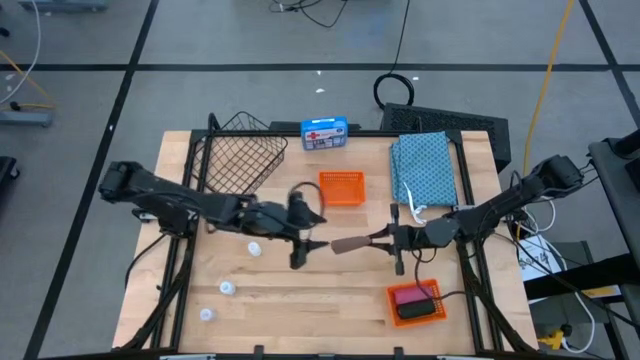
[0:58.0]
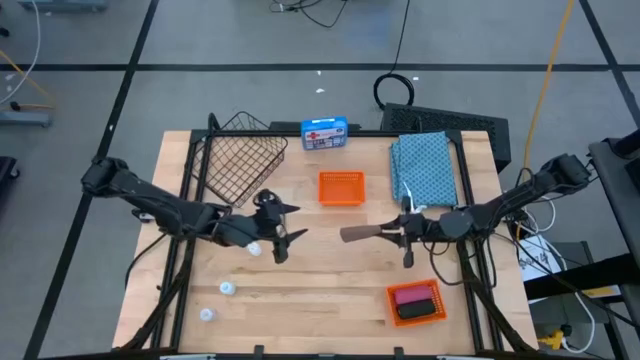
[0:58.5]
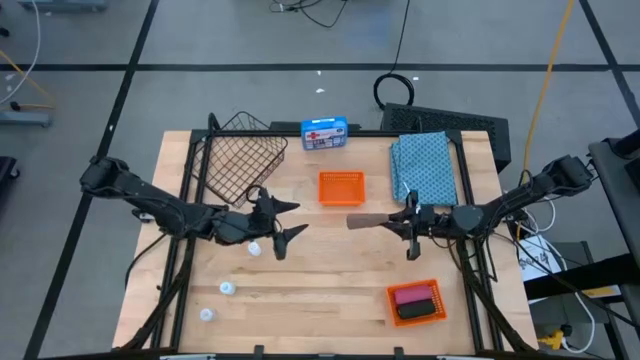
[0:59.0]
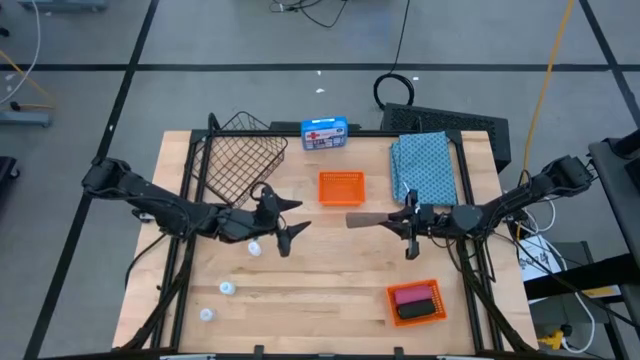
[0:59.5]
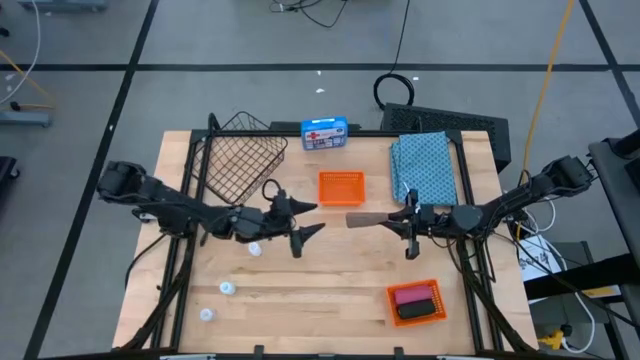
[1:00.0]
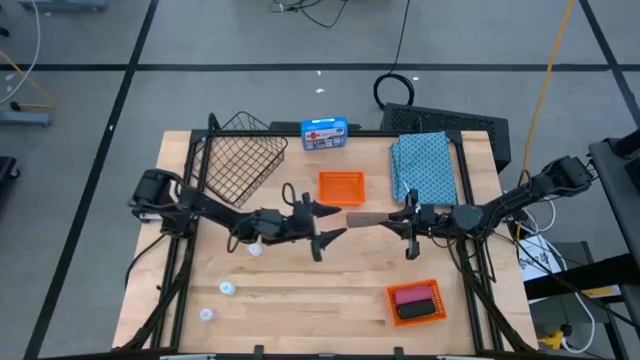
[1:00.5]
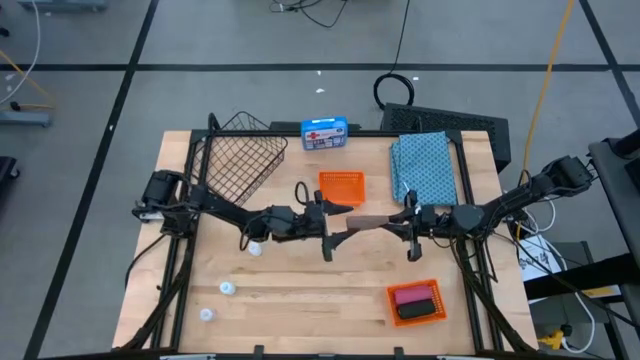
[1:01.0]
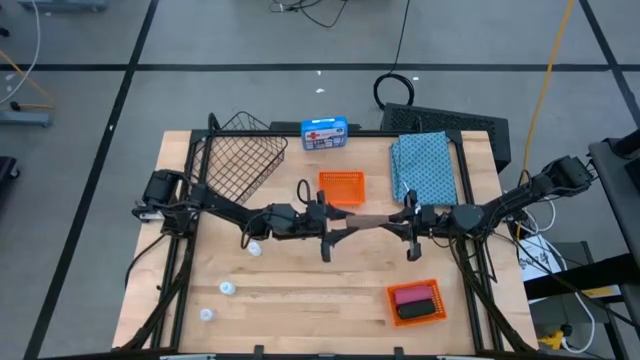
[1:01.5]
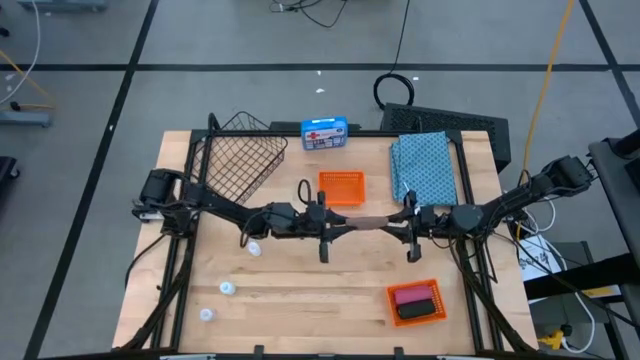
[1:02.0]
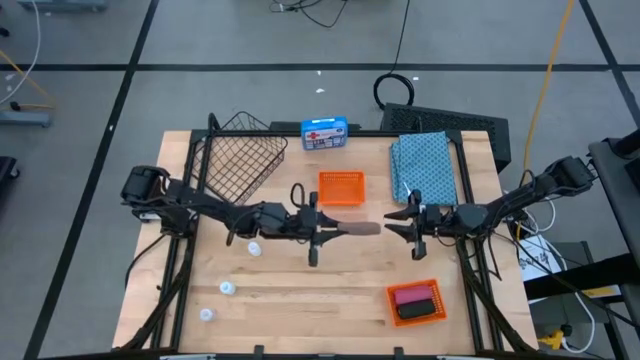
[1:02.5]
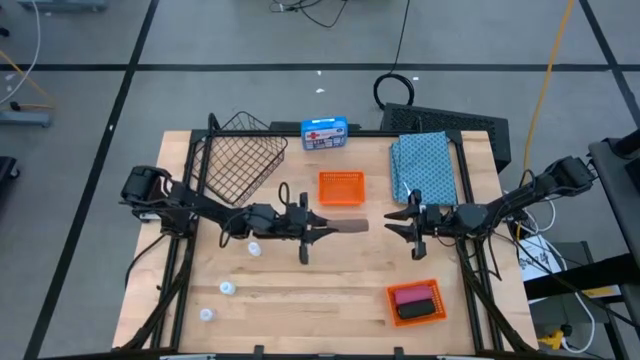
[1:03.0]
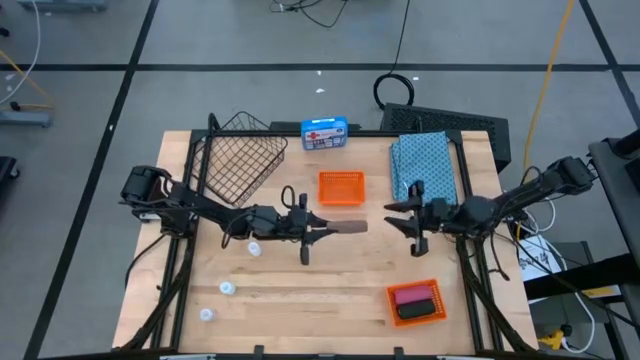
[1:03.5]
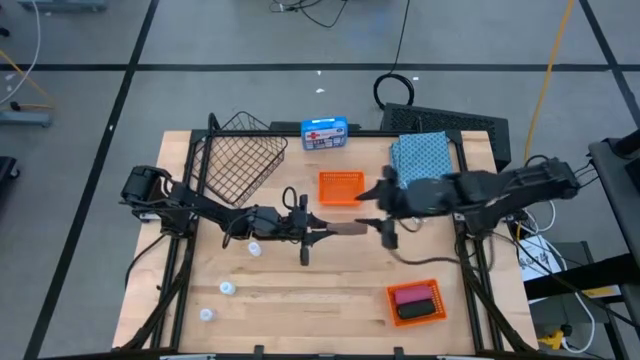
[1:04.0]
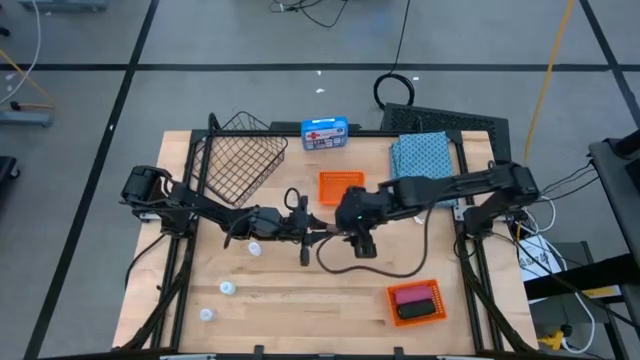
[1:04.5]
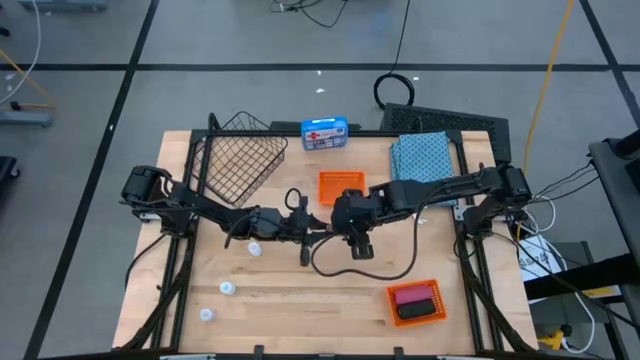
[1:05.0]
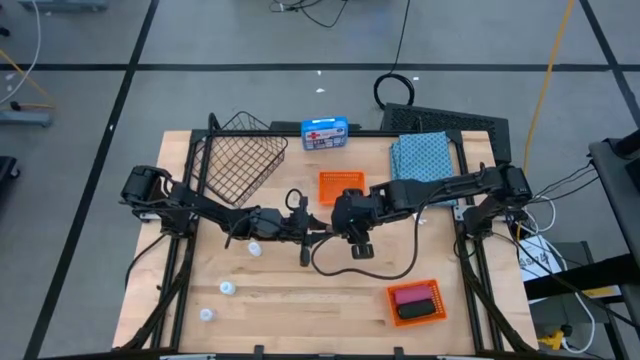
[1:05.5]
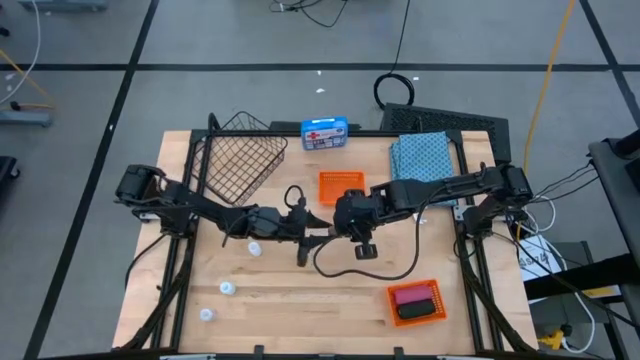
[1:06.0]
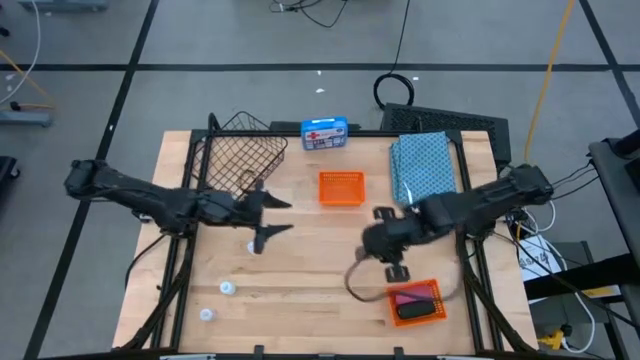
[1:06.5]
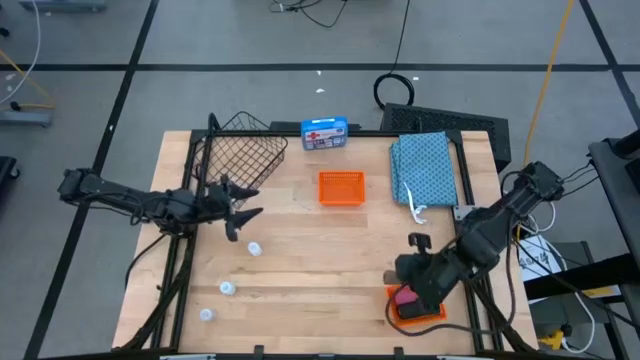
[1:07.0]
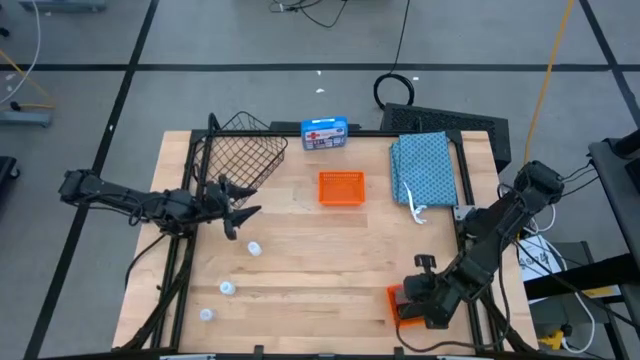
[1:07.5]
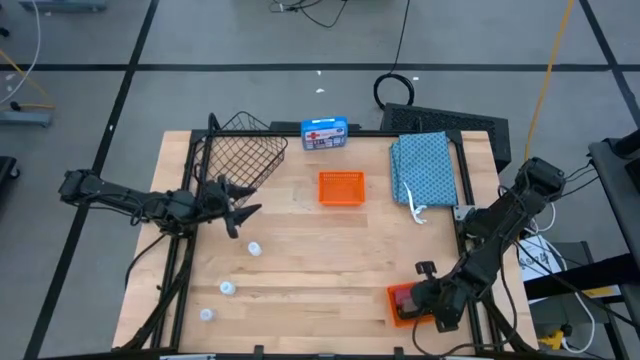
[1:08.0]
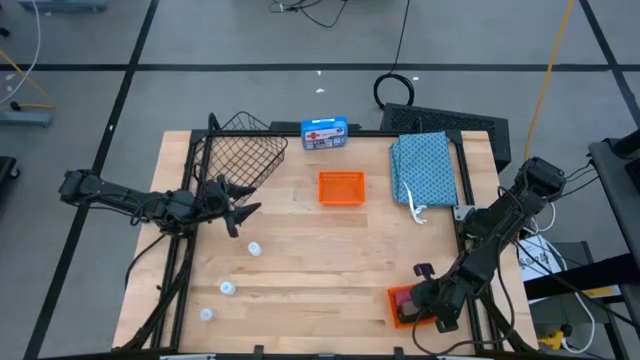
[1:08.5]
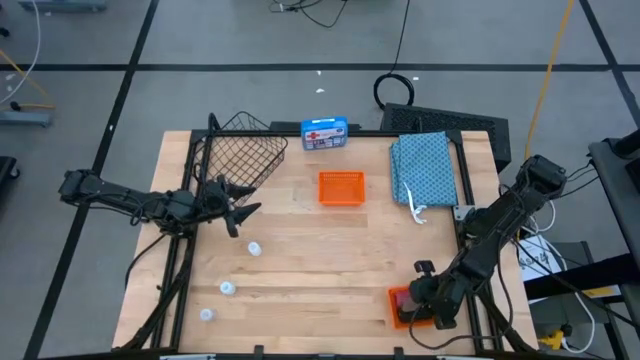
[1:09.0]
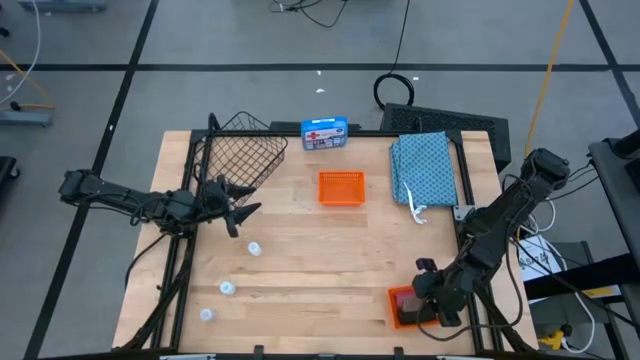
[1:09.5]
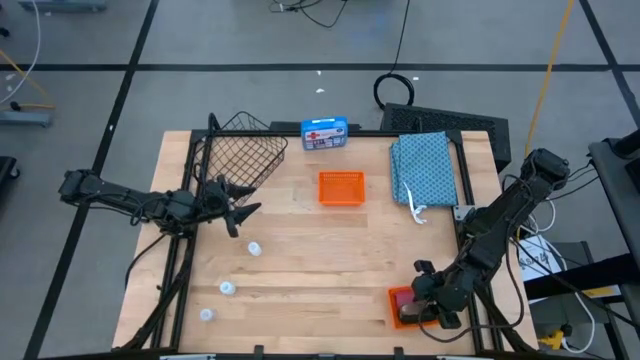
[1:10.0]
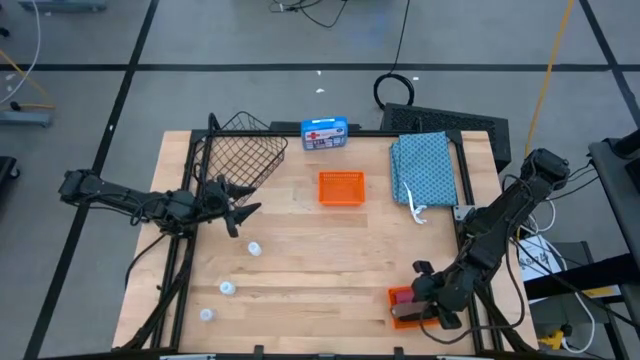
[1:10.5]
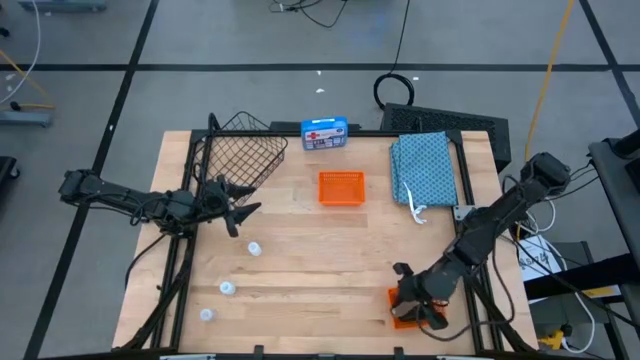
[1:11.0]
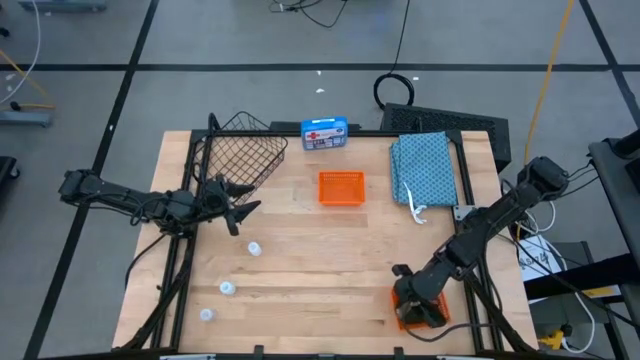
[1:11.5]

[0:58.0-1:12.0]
Task: Pick & place medical supplies in basket/bin
Put the brown bandage into the bottom orange bin

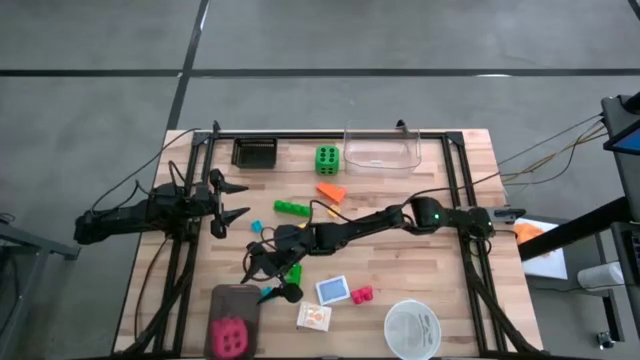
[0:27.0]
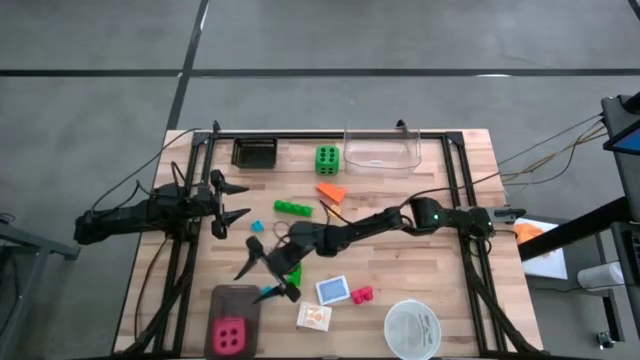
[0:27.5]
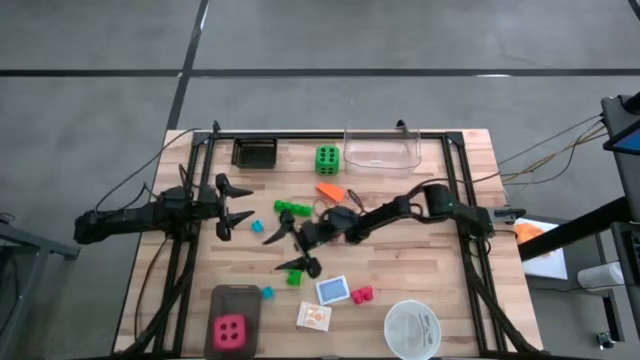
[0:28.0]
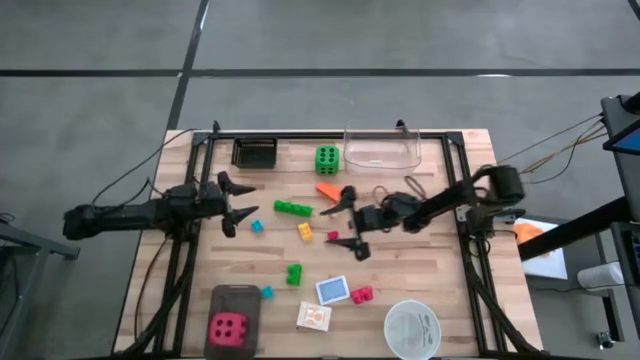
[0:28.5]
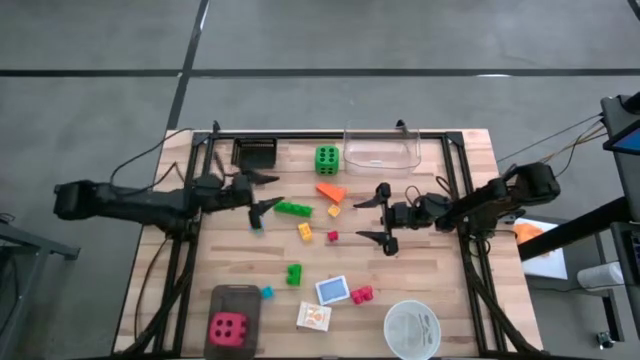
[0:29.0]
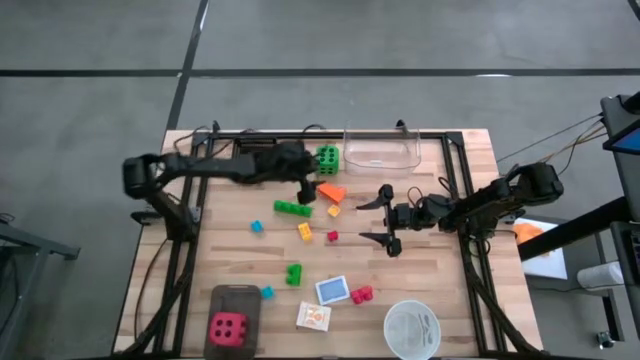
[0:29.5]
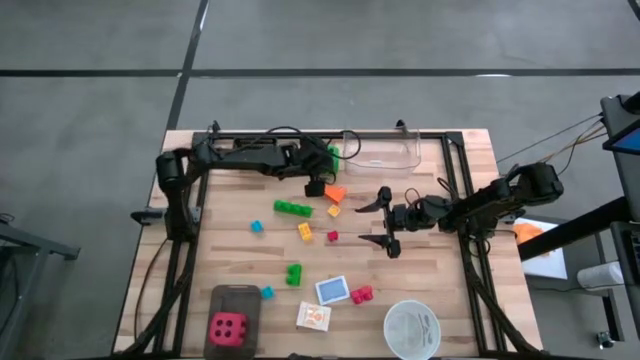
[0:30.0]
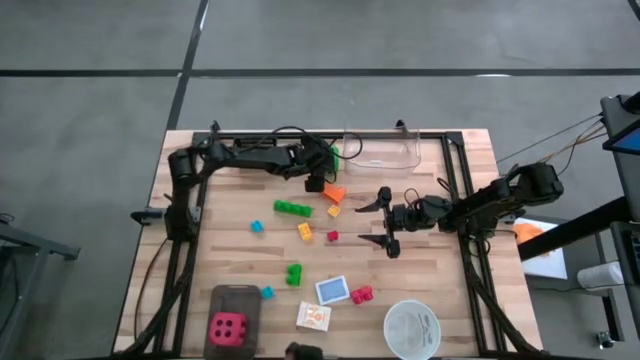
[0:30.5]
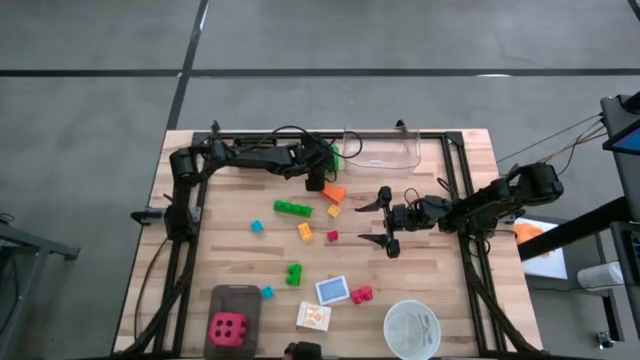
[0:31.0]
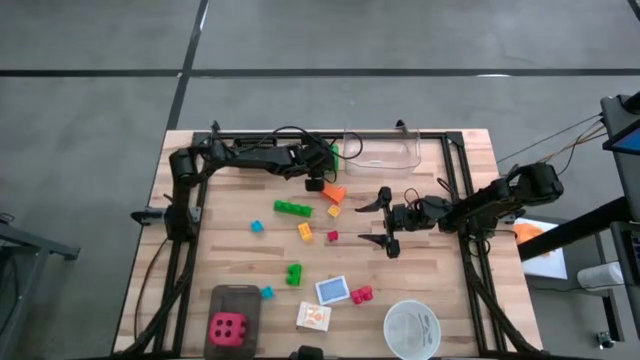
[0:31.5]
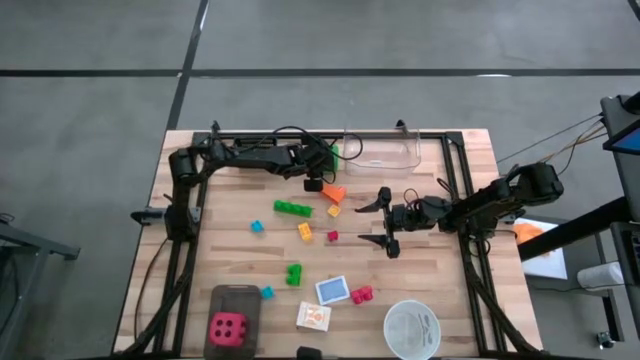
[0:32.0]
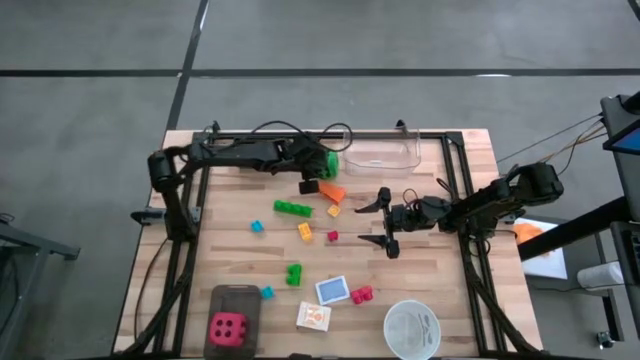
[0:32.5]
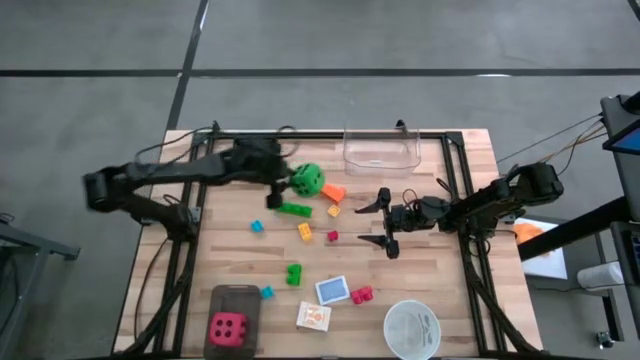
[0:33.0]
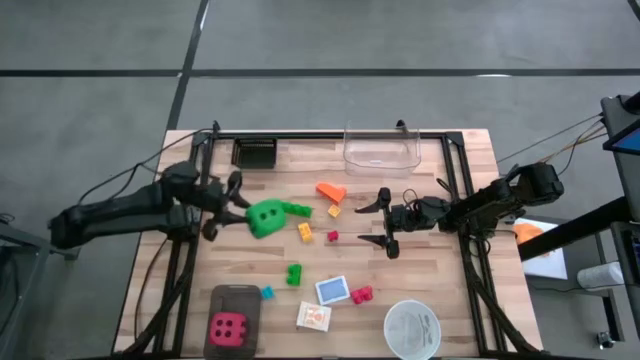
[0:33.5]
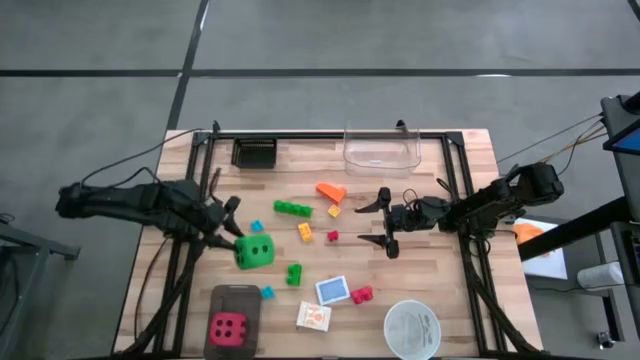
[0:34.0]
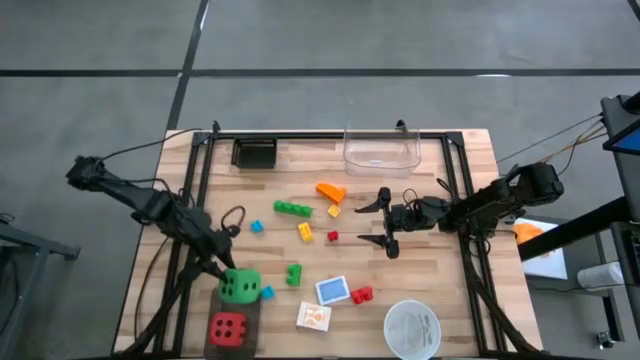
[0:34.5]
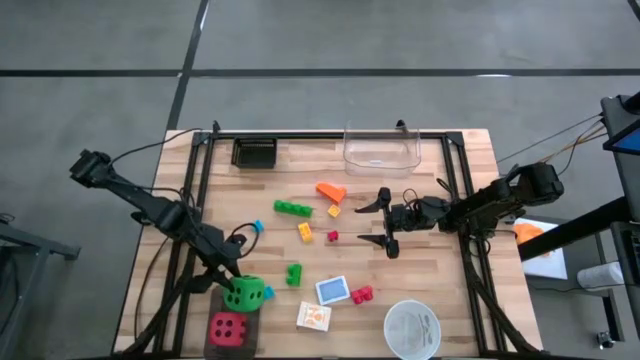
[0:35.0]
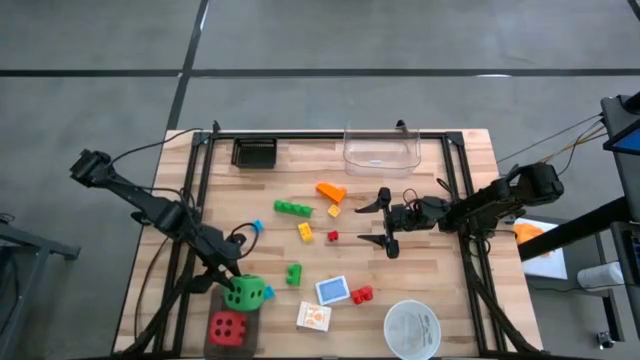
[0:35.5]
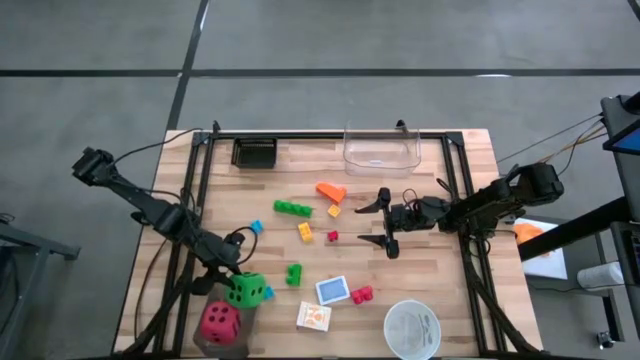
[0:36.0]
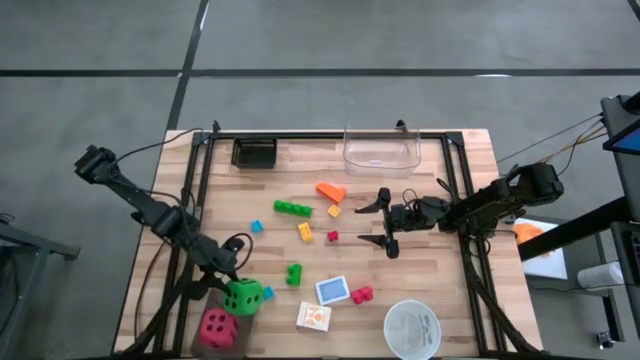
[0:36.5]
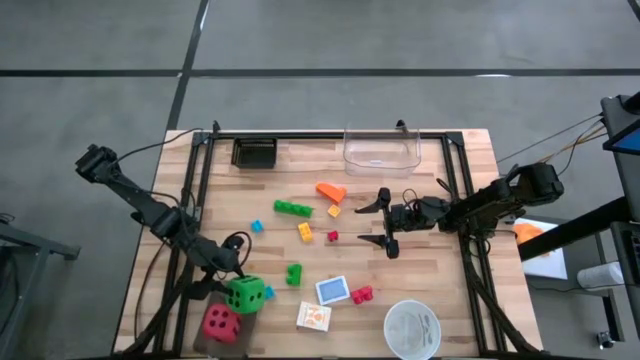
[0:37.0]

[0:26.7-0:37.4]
Task: Pick & Place Toys
Put the green die into the gray bin
